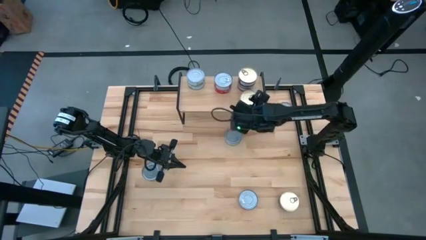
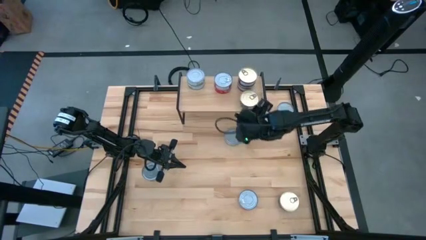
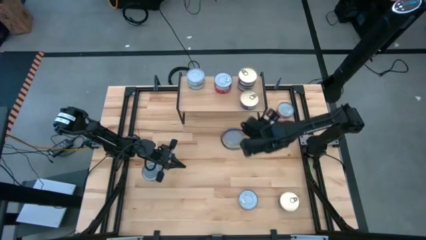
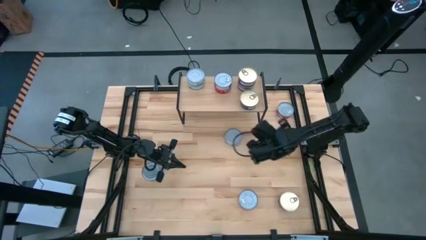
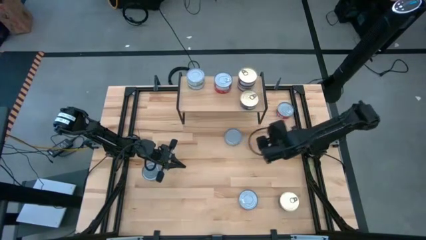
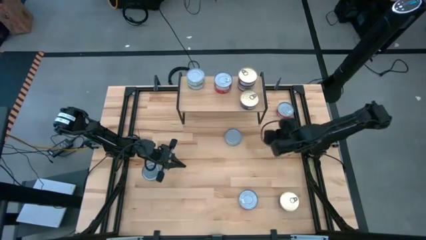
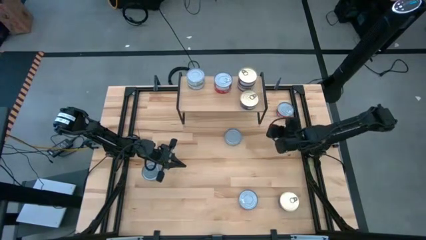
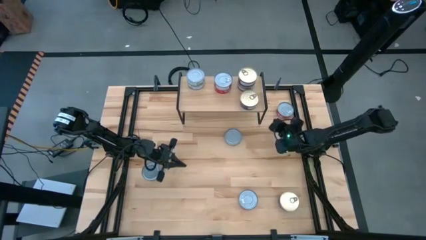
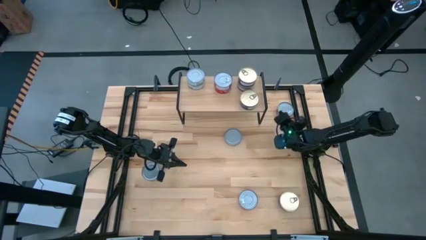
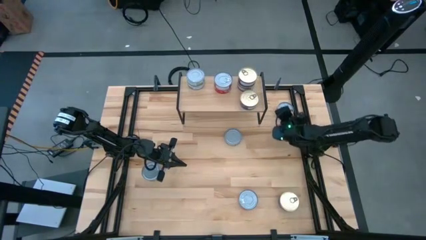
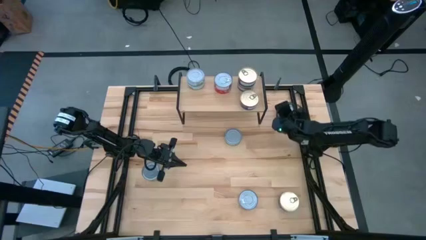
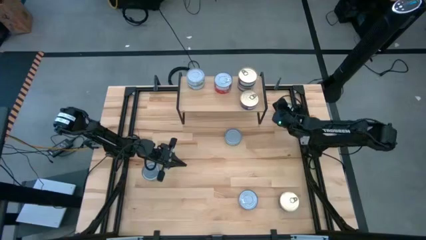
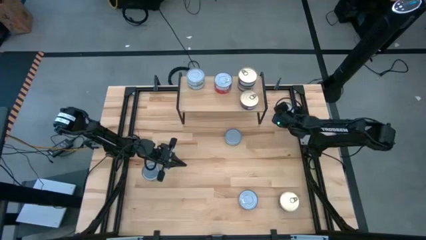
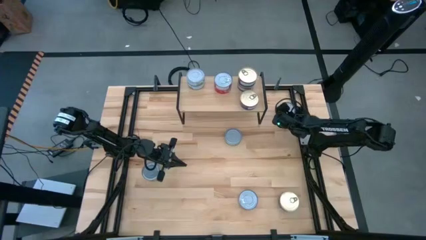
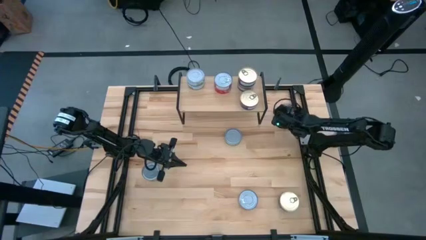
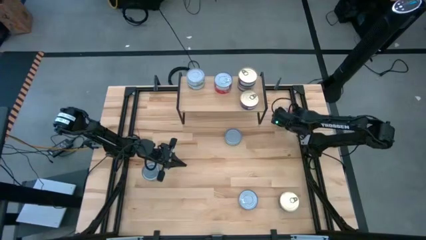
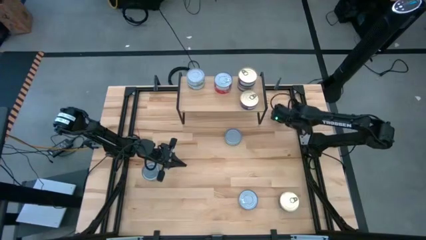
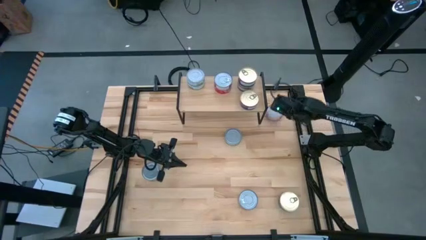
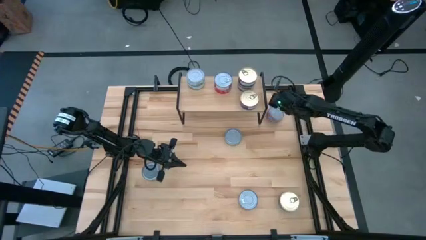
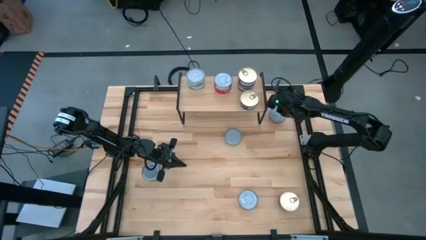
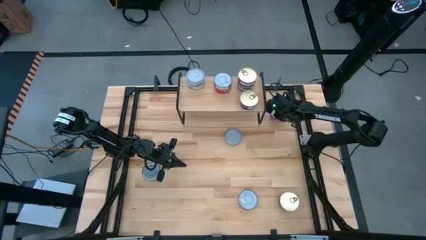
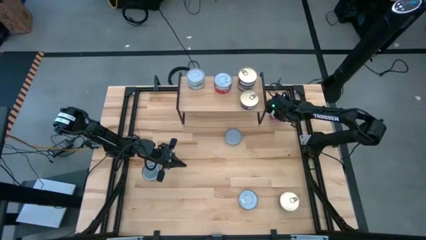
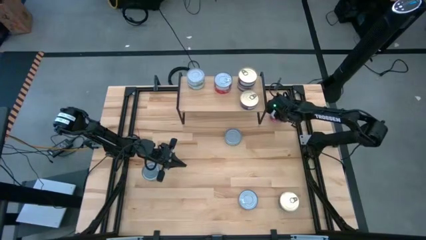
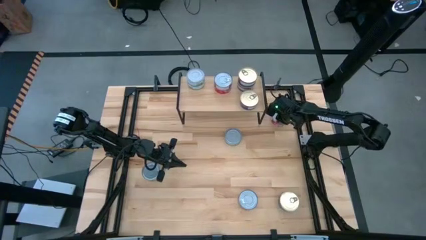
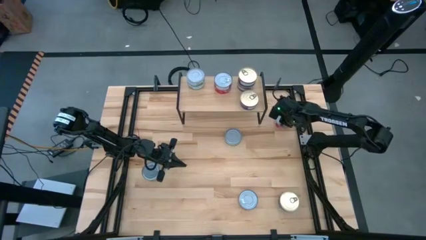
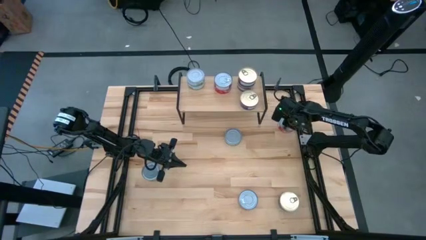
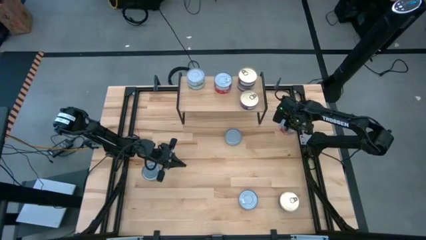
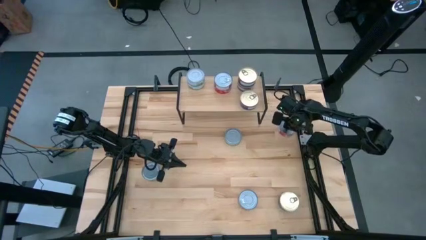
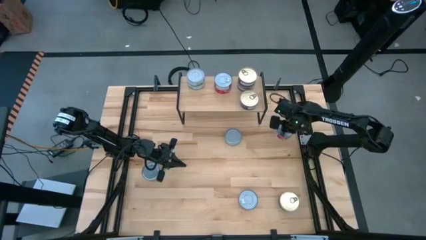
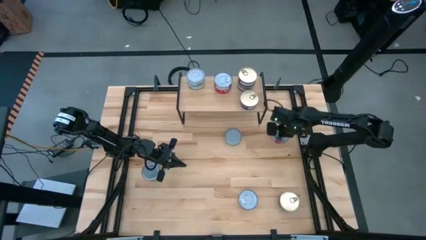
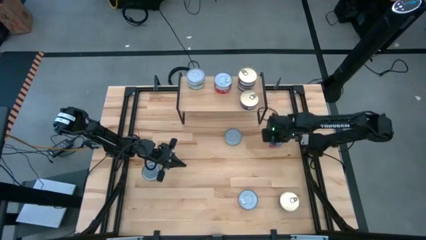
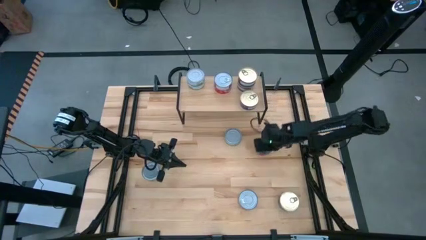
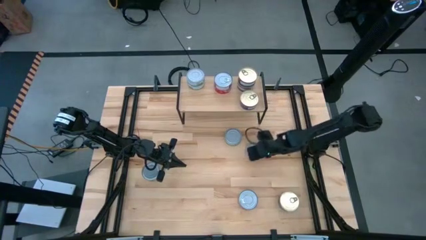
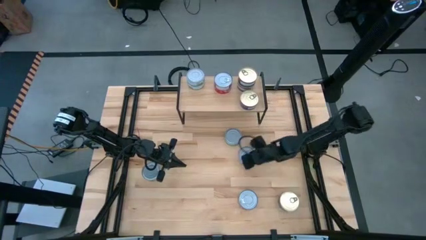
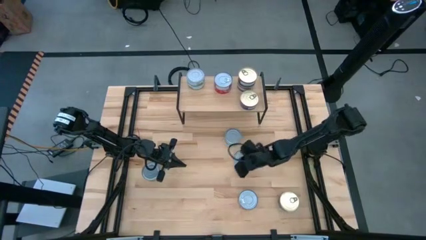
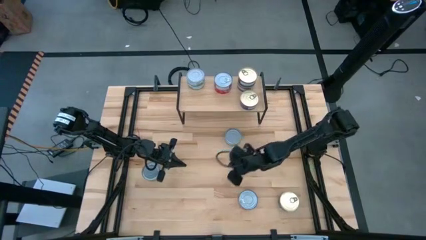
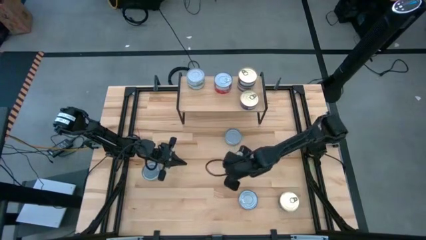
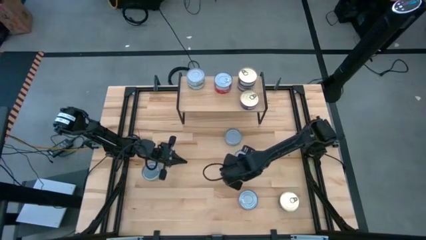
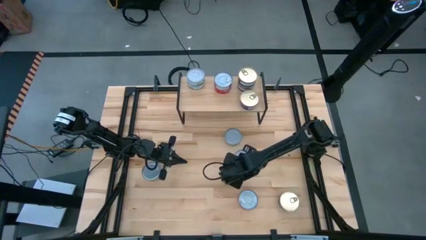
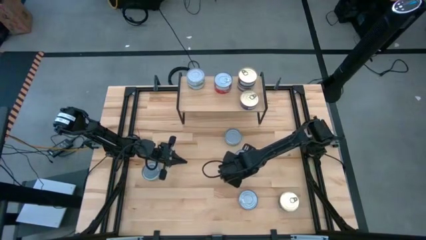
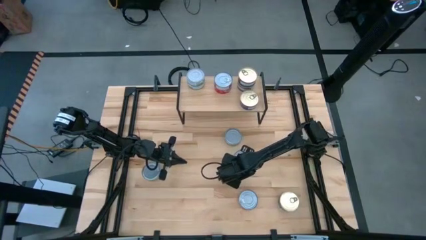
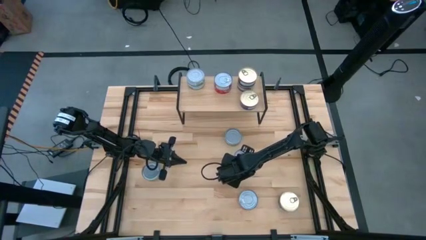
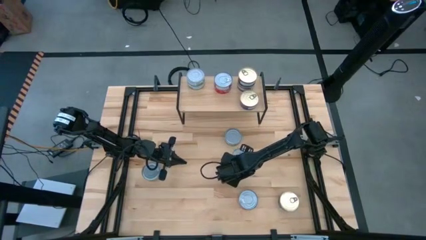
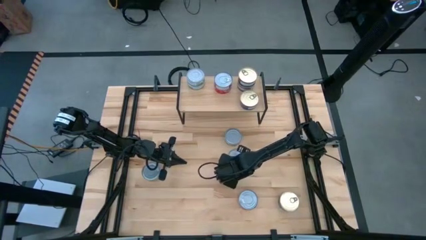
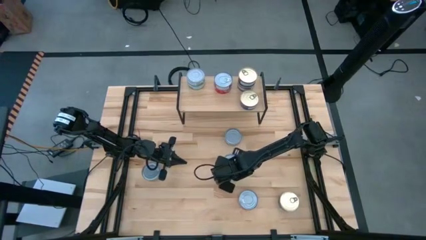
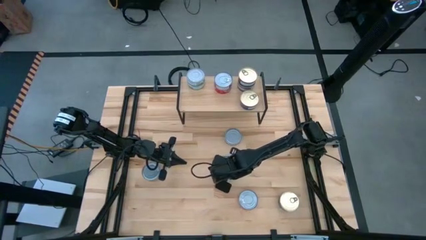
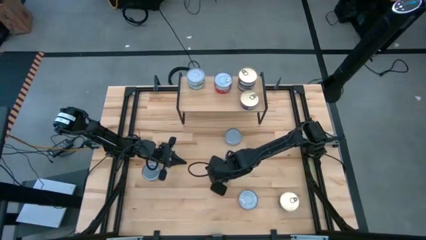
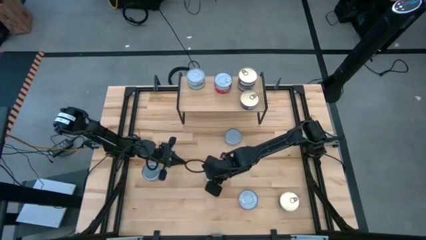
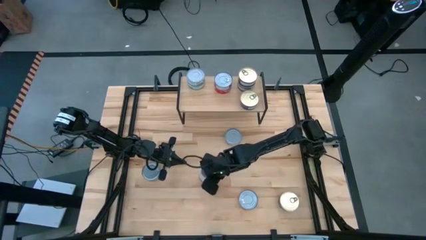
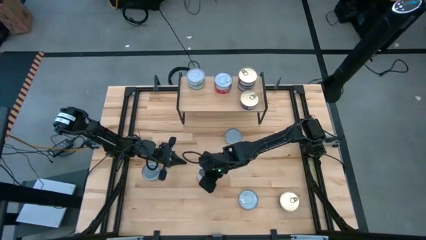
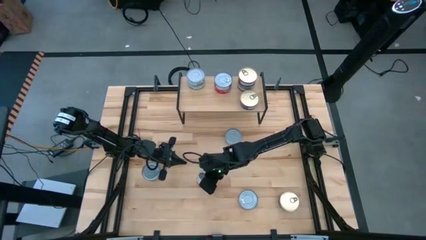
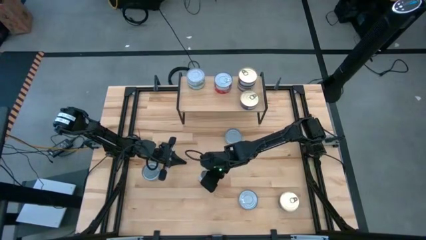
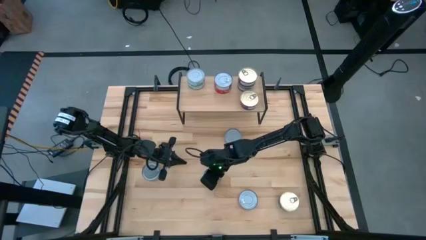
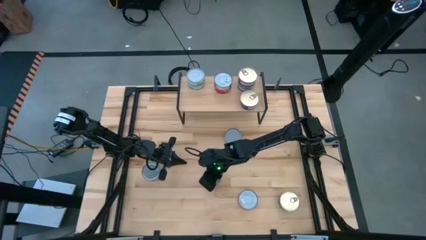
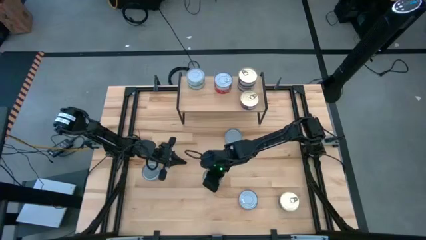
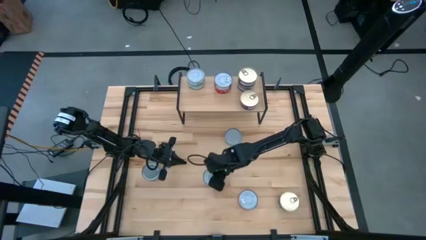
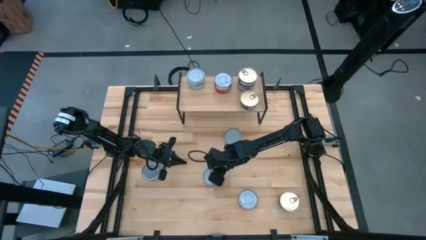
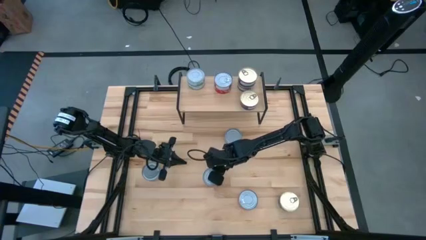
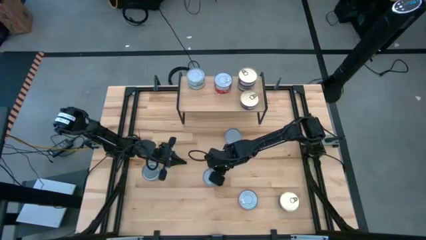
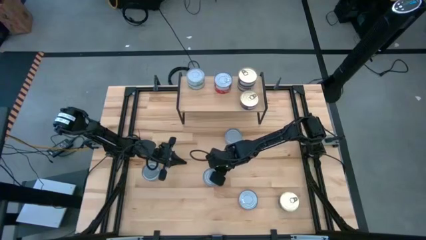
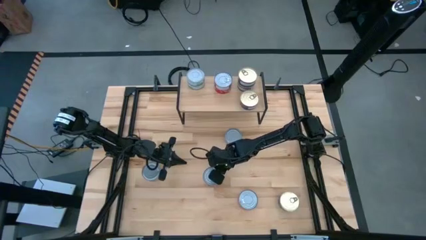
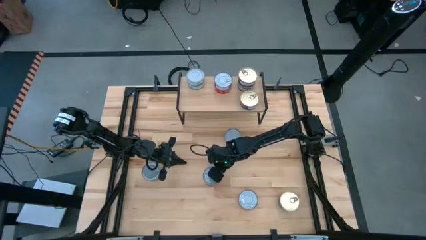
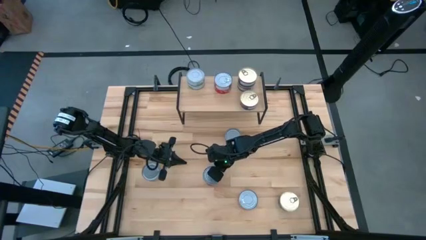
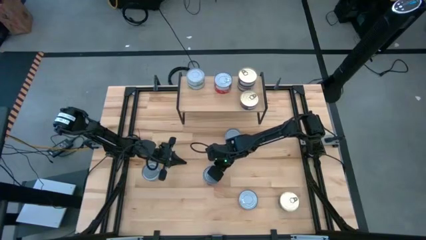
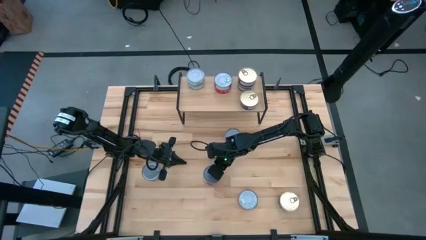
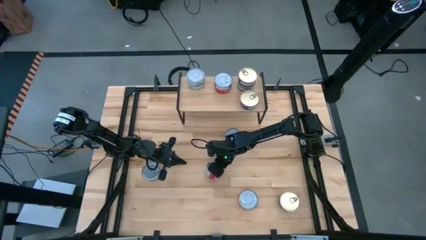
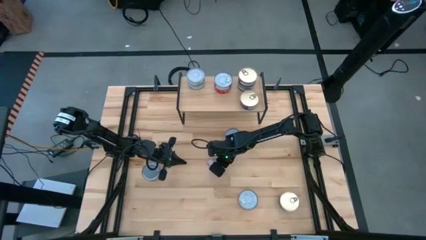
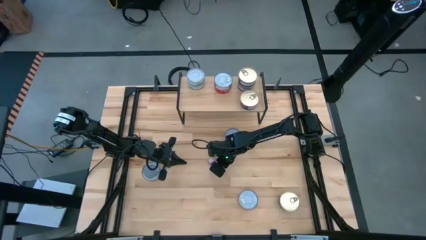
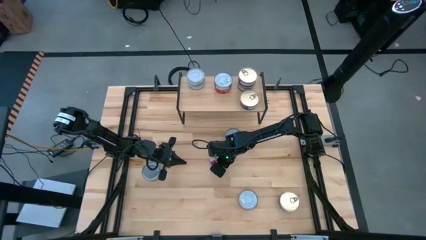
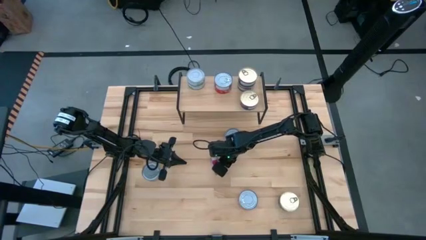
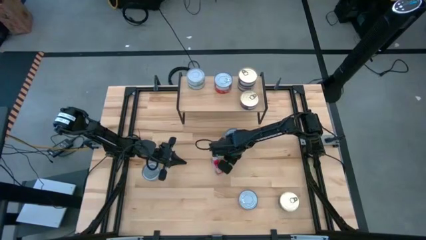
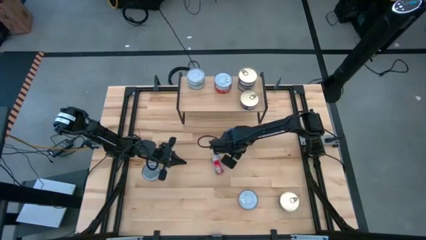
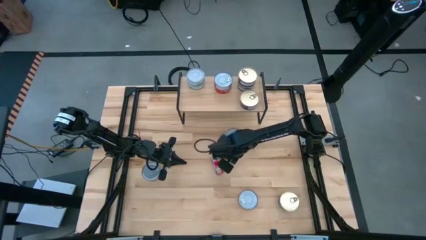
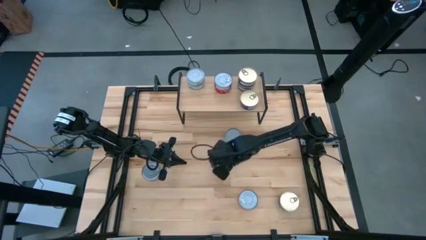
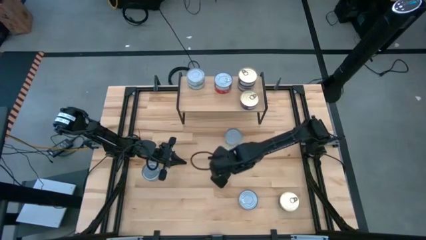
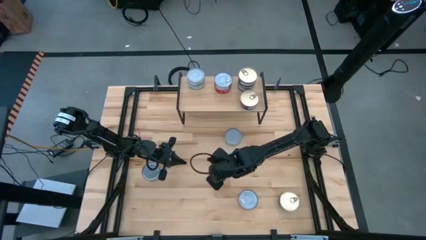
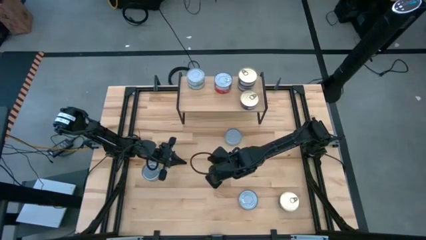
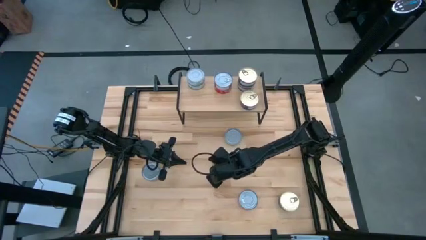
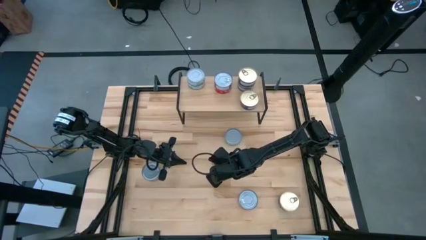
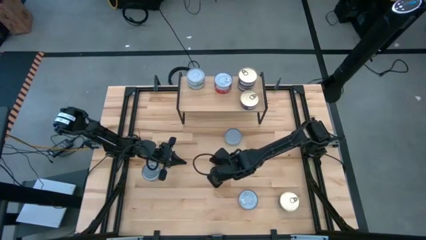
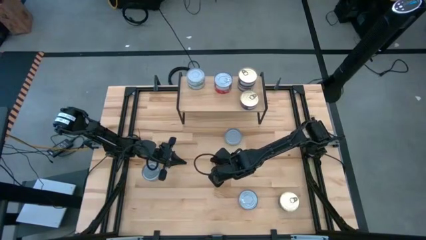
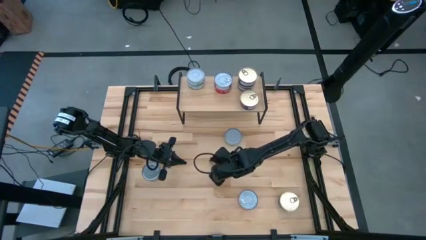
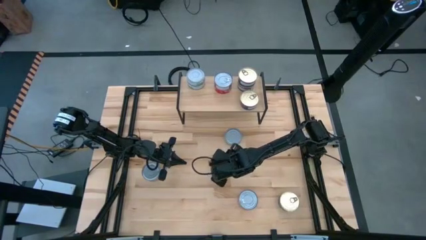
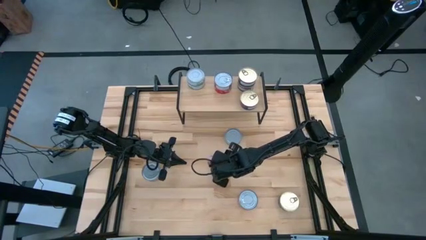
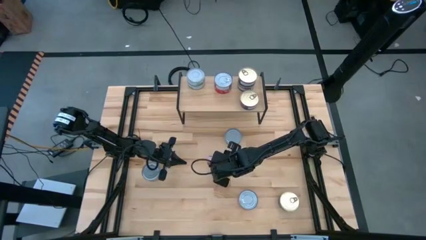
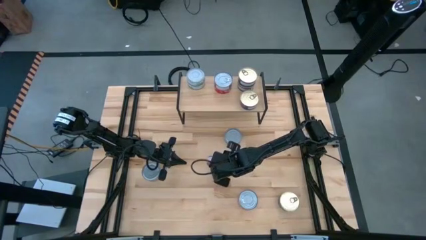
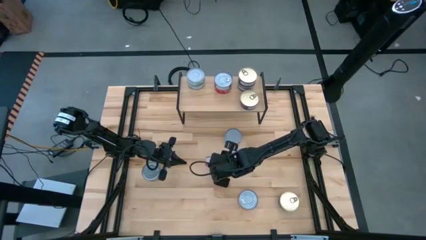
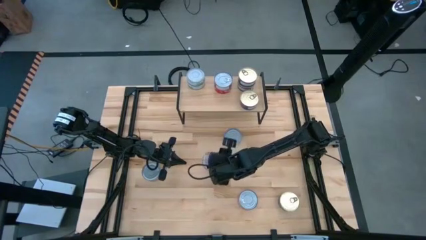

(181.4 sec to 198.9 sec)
Task: Stack canned seafood by type on shelf
Put the red tuna can on the shelf aligned with the red tuna cans
